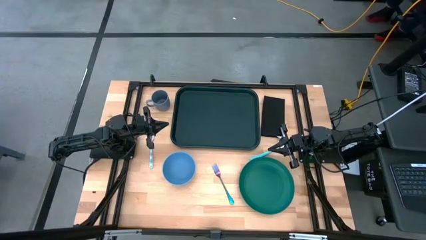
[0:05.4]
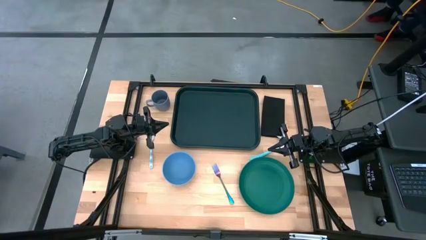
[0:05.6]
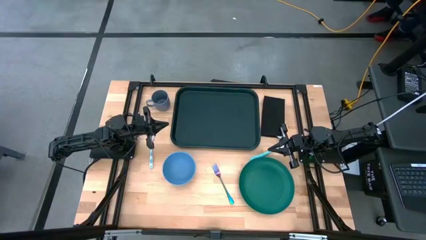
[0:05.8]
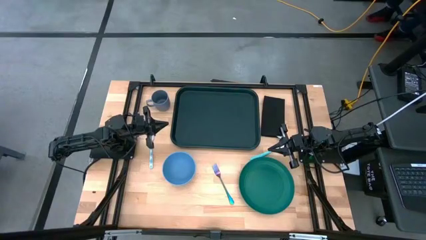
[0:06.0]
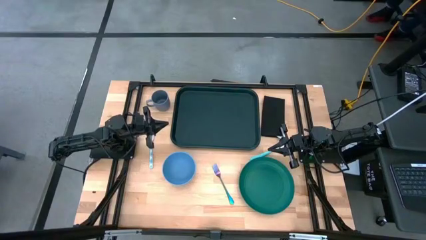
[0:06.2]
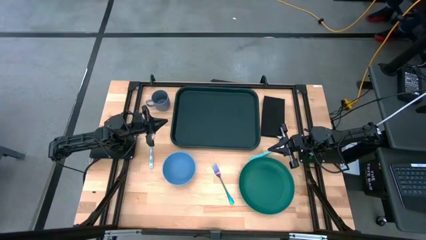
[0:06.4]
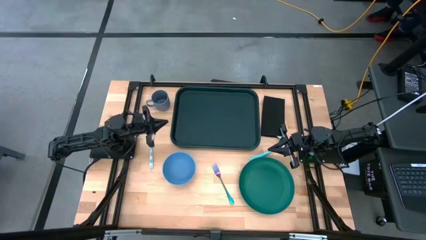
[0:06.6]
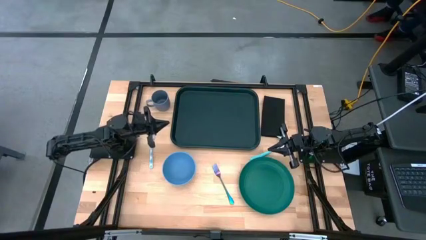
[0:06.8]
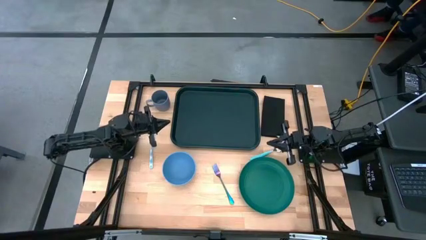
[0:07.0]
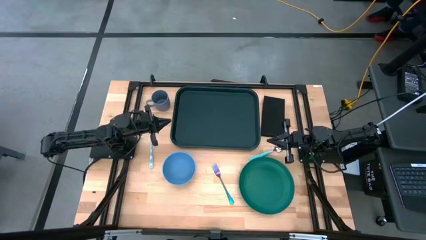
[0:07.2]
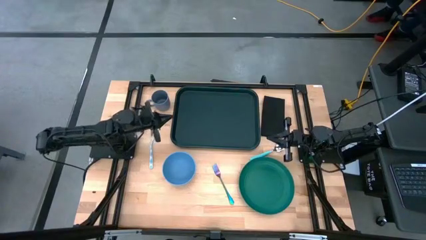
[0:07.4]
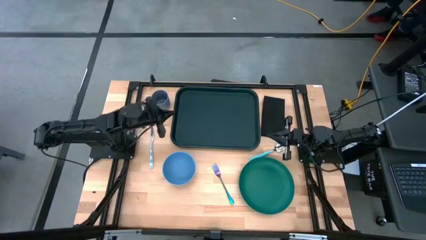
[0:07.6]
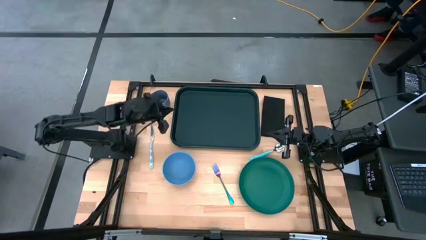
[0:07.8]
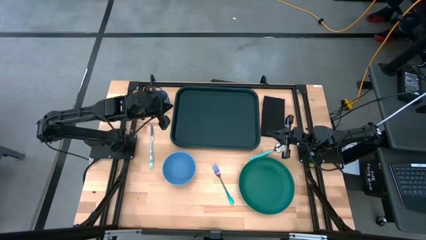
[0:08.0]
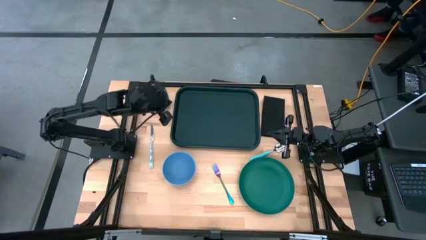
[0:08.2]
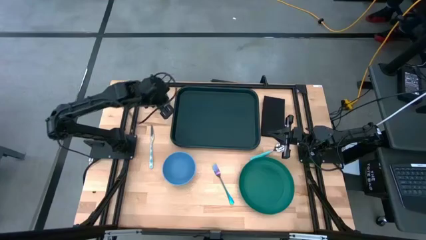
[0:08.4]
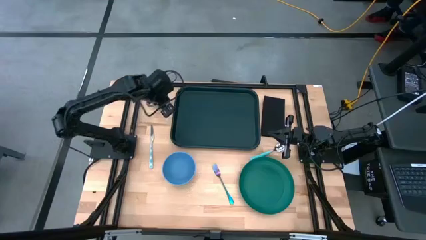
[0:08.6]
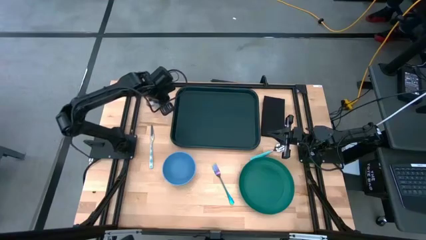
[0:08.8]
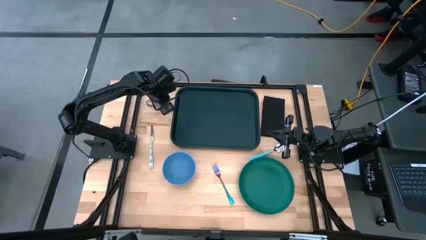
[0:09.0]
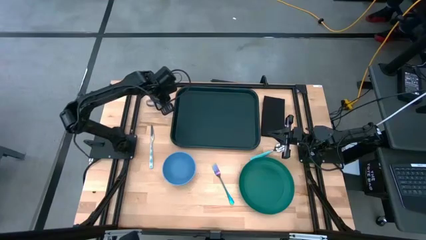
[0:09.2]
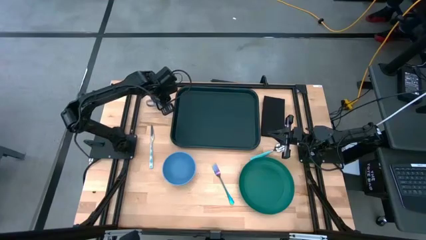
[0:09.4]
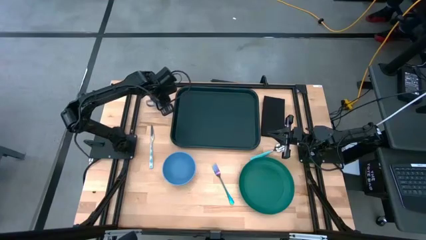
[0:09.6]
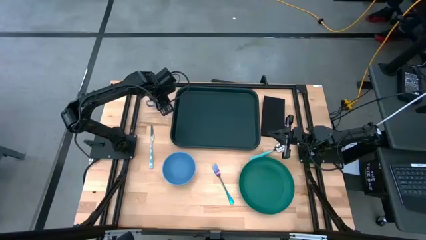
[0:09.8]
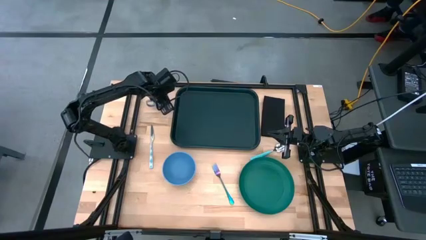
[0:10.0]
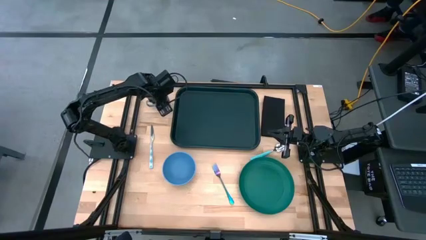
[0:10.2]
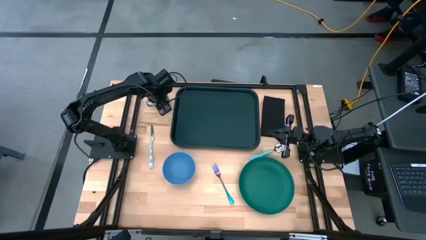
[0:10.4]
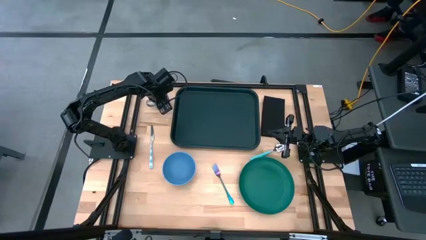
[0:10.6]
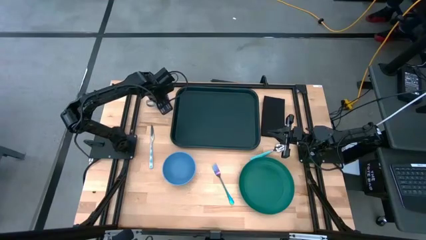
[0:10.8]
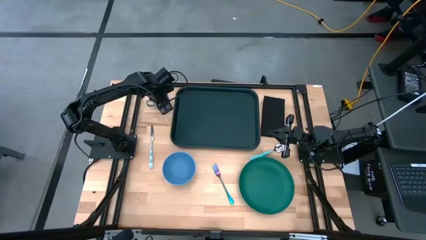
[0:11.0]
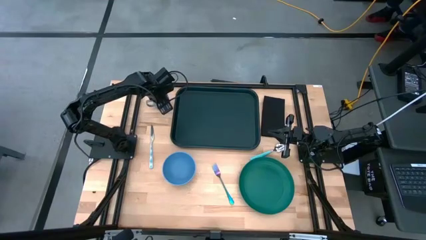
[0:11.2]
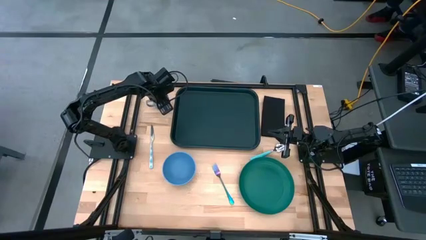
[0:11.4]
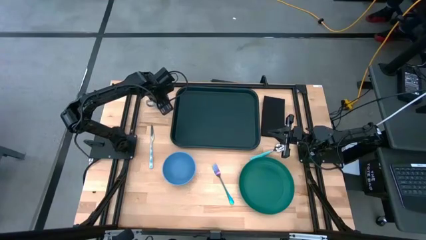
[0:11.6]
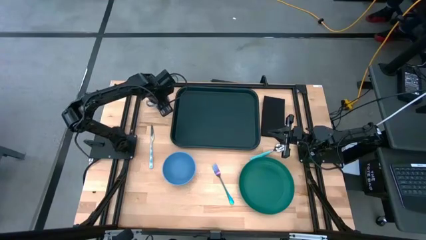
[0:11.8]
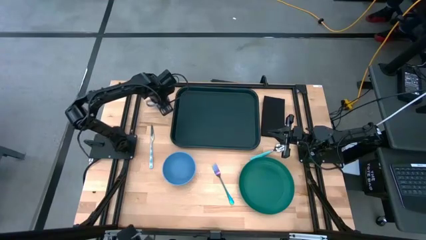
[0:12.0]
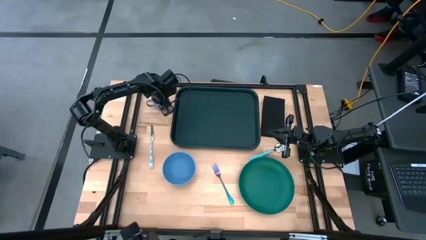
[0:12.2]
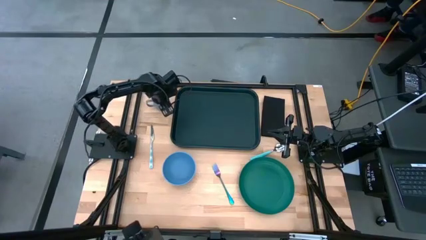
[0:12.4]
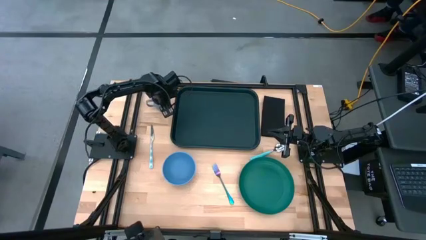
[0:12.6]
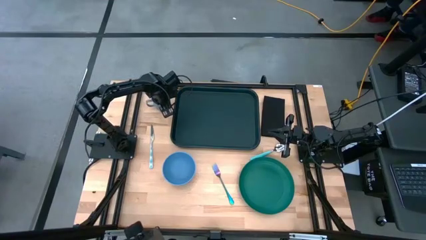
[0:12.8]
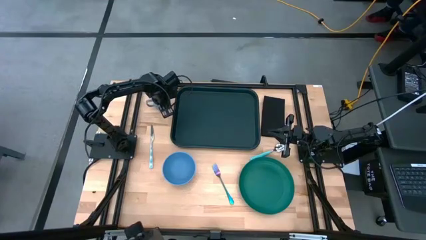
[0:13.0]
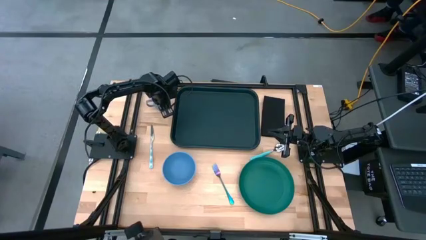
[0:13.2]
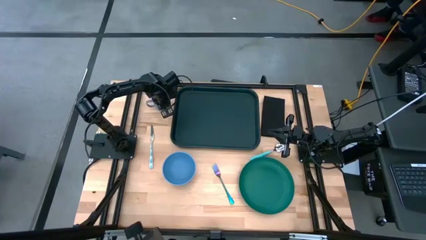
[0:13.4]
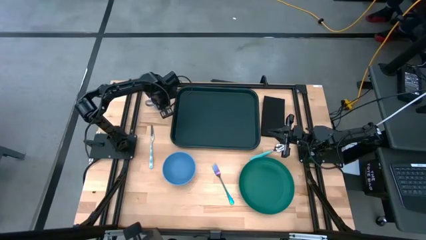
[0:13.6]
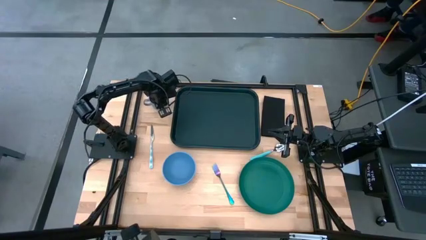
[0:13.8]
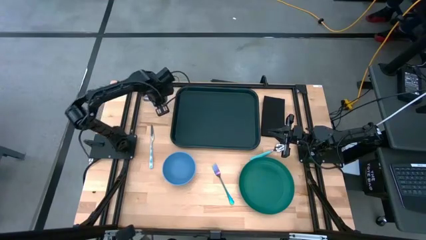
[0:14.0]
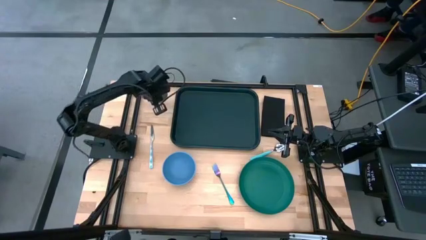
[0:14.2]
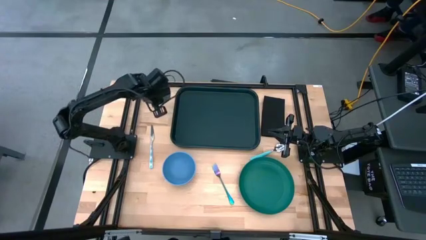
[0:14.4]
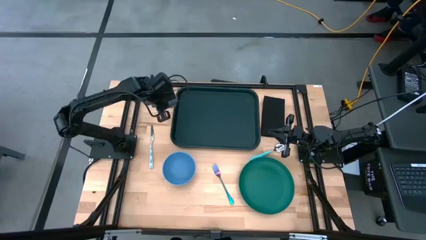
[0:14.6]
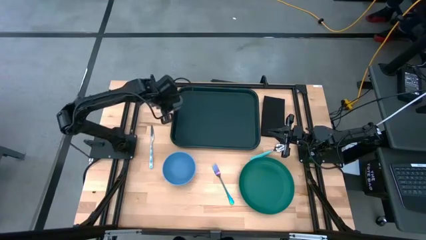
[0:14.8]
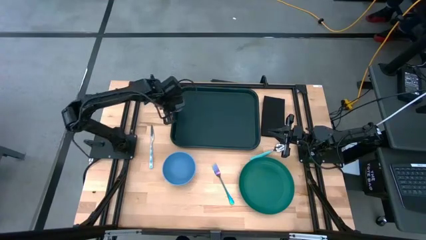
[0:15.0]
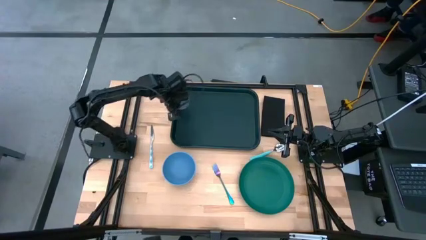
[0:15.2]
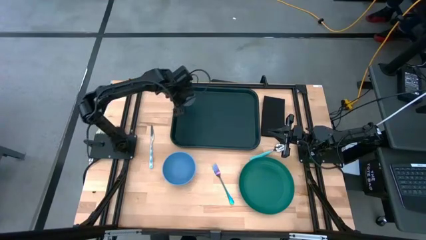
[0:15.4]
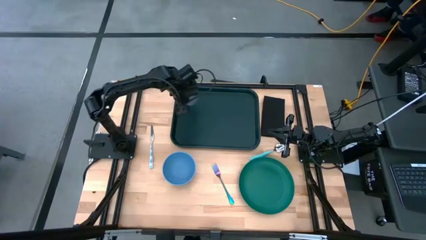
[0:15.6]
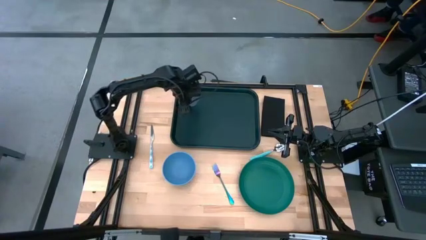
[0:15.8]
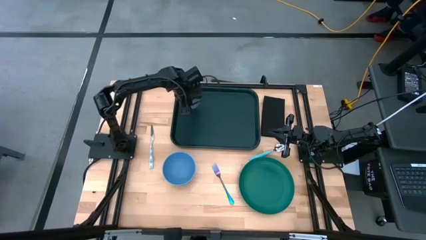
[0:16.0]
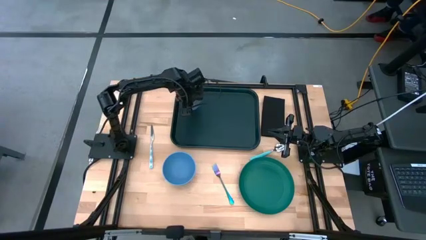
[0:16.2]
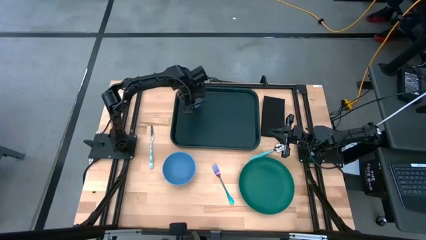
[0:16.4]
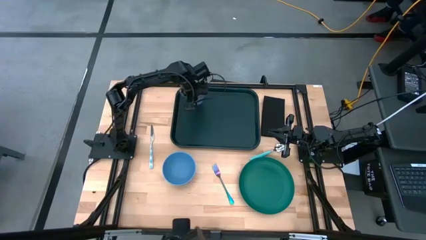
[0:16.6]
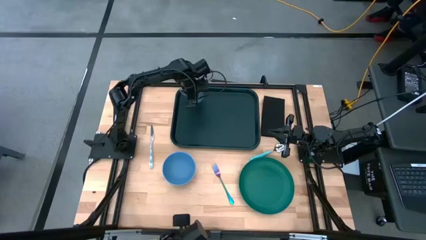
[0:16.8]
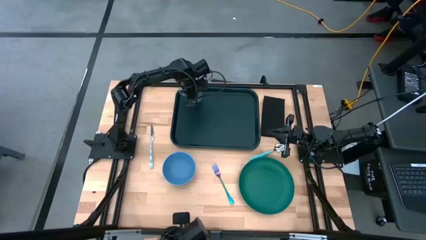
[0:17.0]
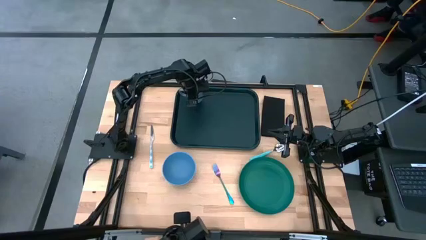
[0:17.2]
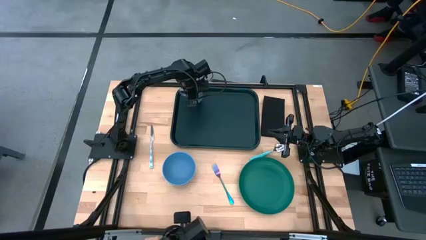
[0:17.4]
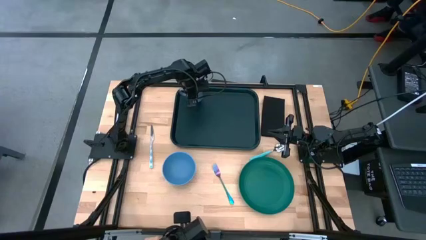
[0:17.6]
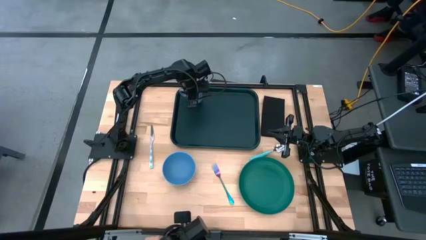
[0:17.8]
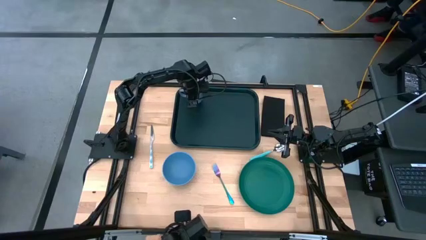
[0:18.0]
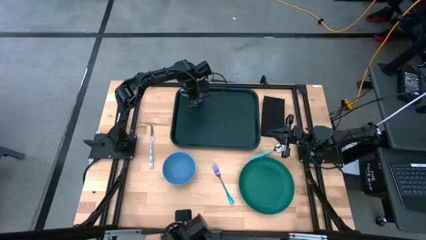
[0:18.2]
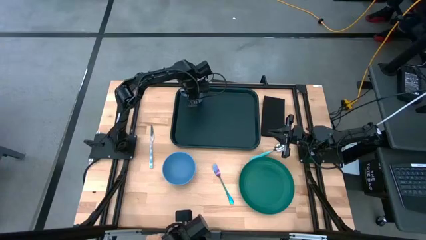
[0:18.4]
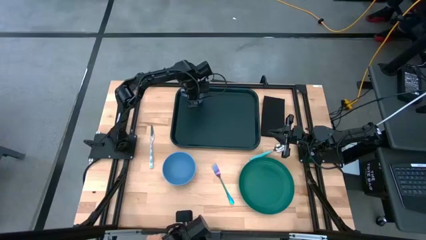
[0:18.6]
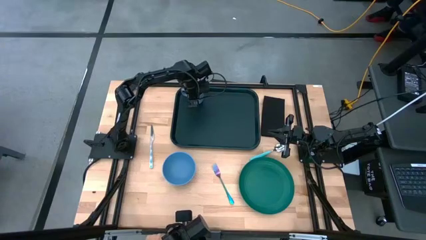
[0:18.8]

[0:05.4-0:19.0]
Task: Set up tray
Put the purple cup on top of the black tray
